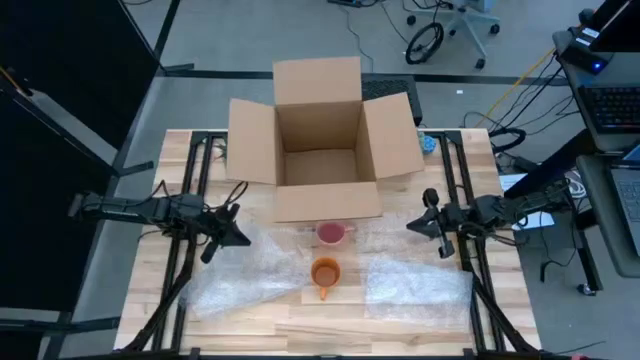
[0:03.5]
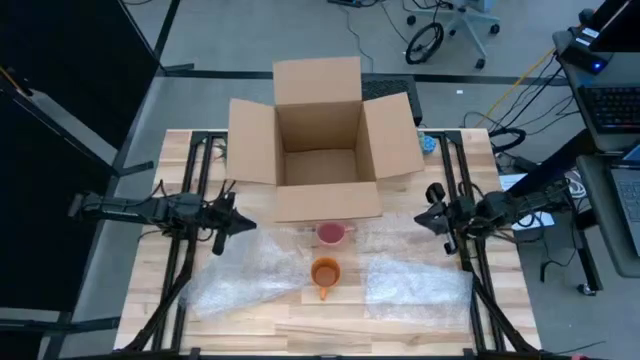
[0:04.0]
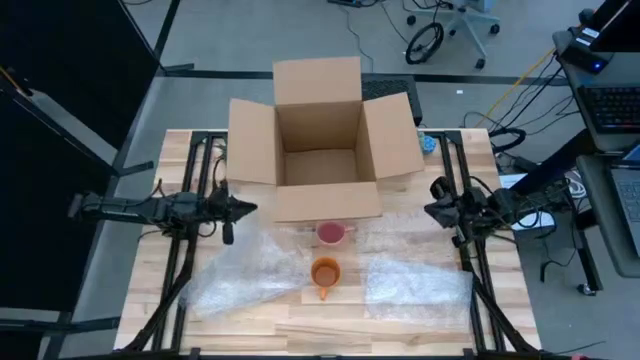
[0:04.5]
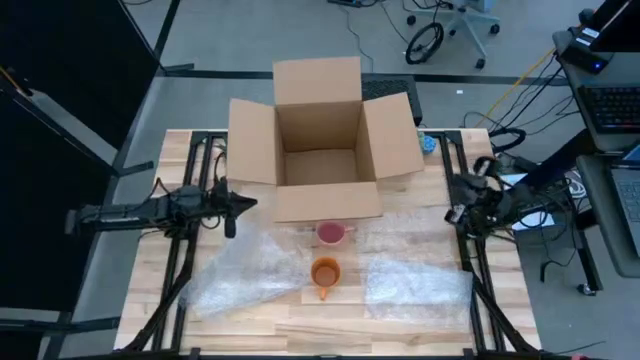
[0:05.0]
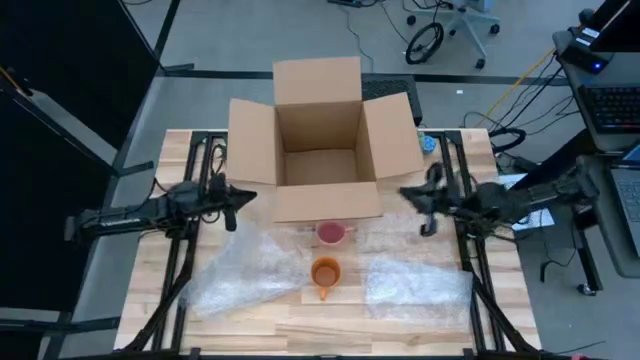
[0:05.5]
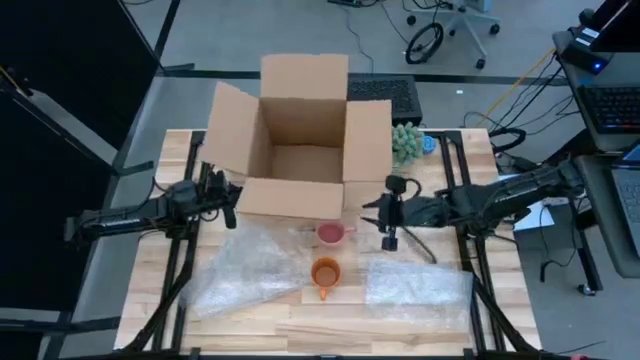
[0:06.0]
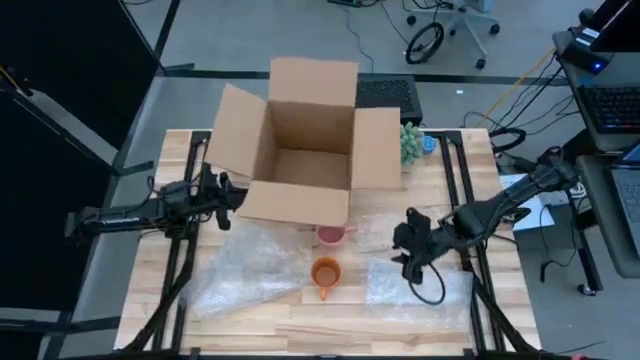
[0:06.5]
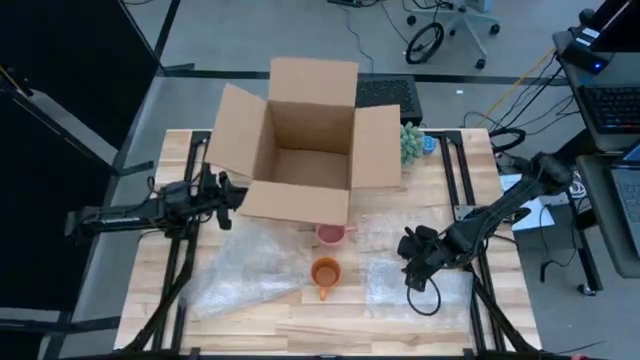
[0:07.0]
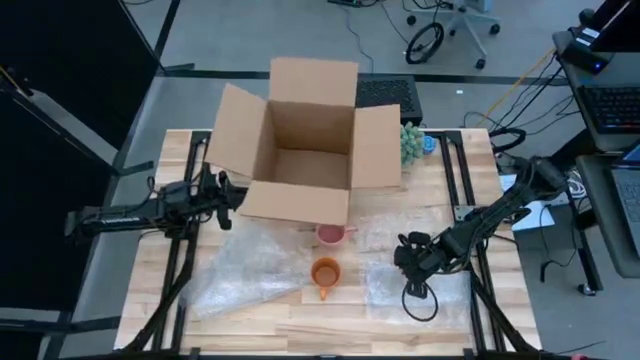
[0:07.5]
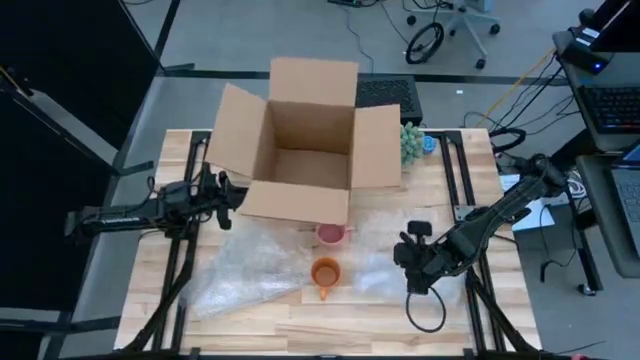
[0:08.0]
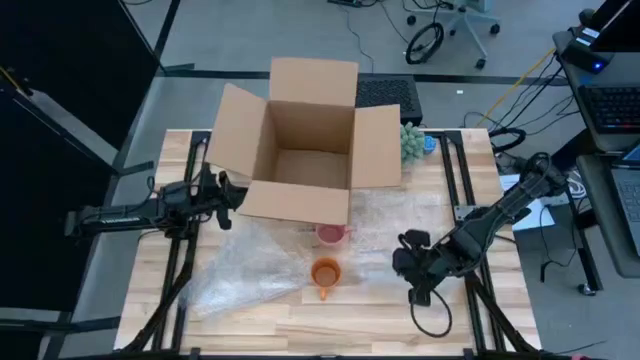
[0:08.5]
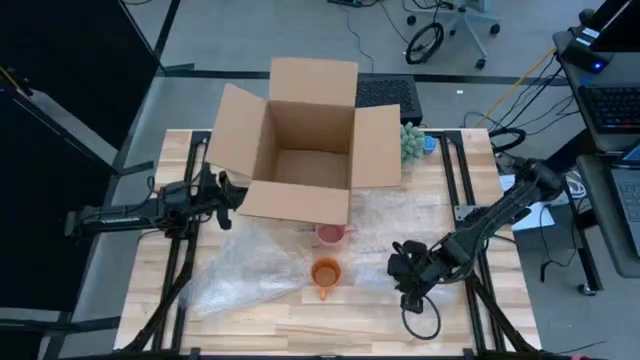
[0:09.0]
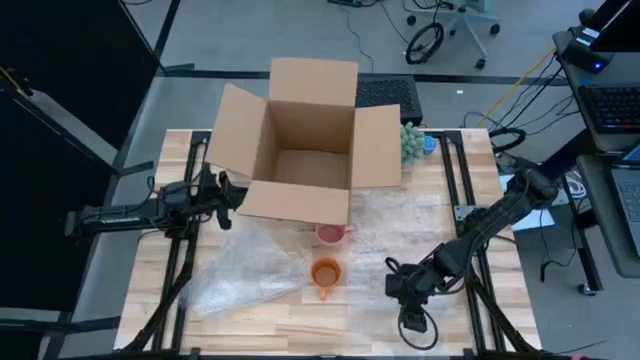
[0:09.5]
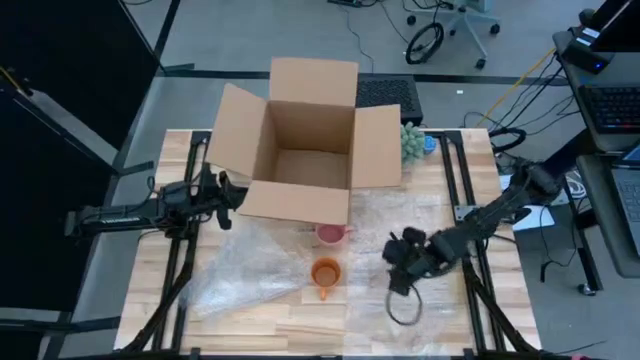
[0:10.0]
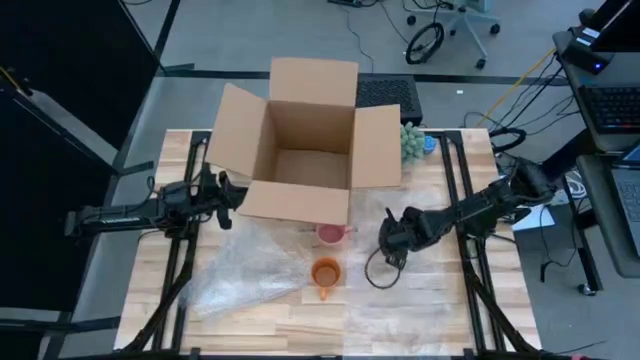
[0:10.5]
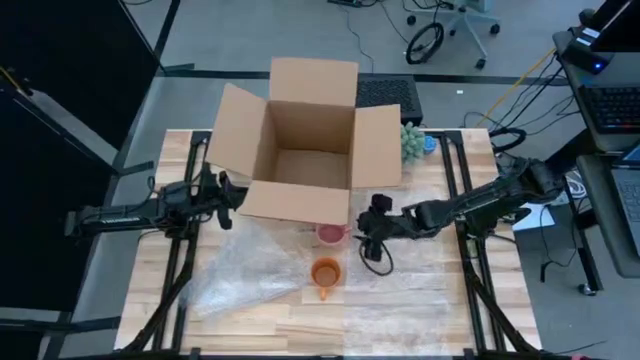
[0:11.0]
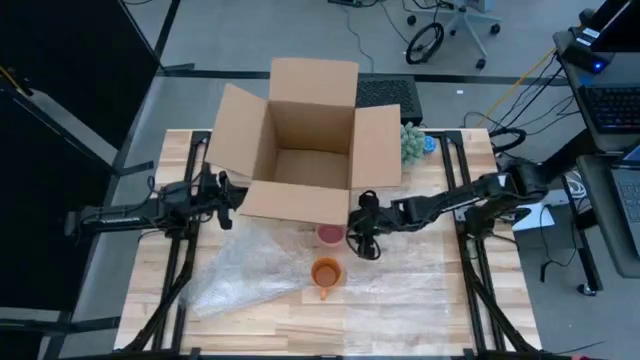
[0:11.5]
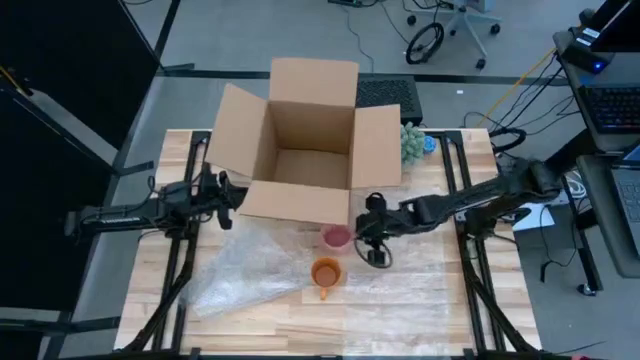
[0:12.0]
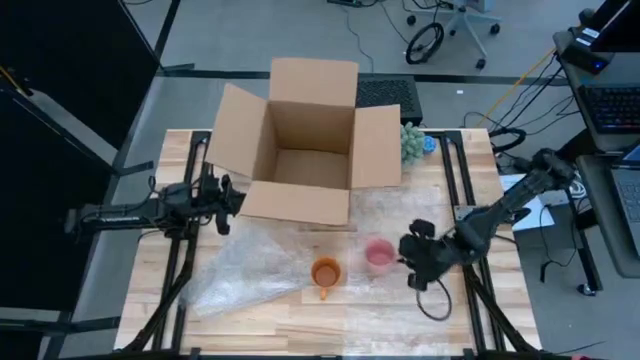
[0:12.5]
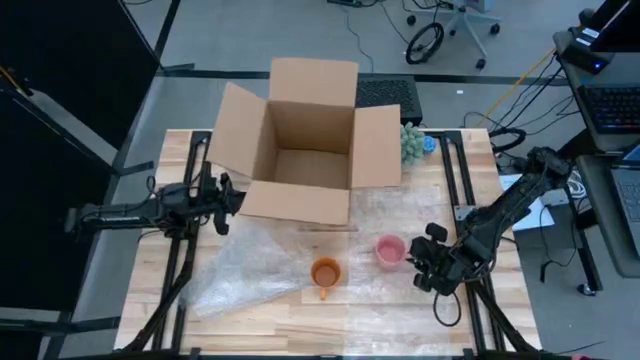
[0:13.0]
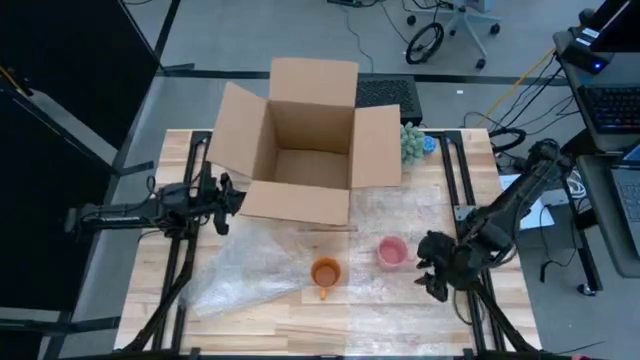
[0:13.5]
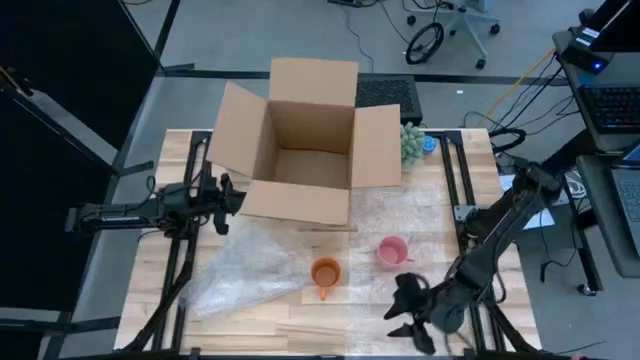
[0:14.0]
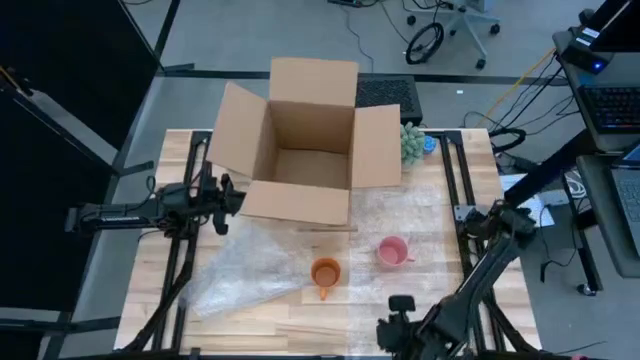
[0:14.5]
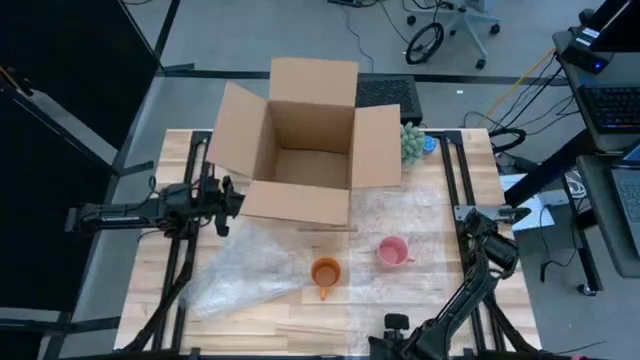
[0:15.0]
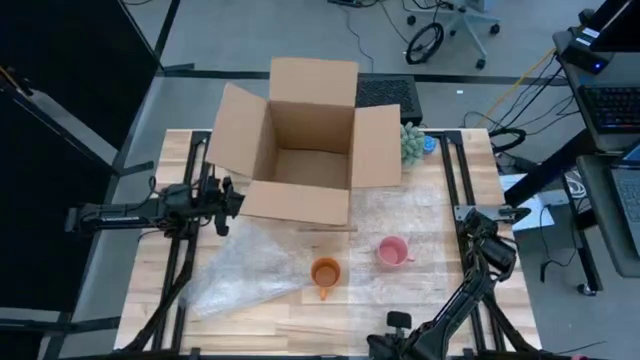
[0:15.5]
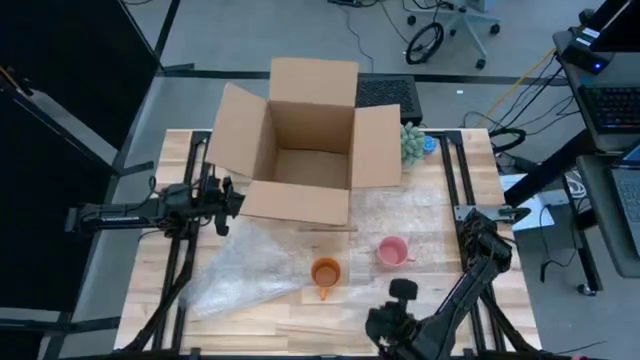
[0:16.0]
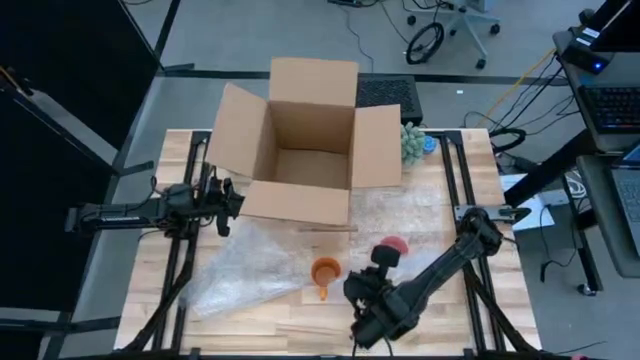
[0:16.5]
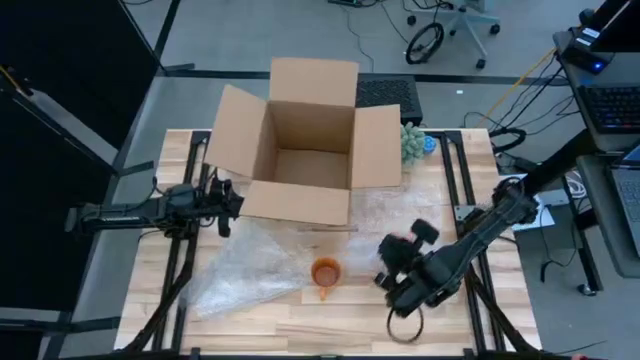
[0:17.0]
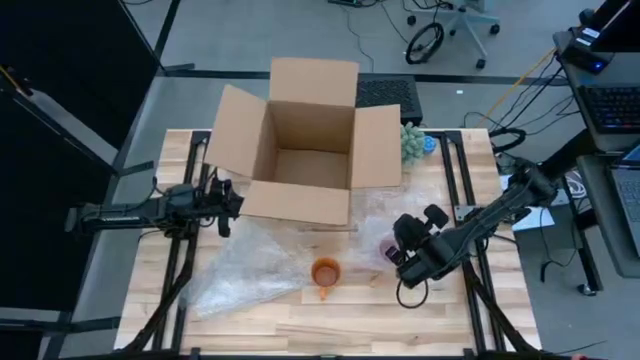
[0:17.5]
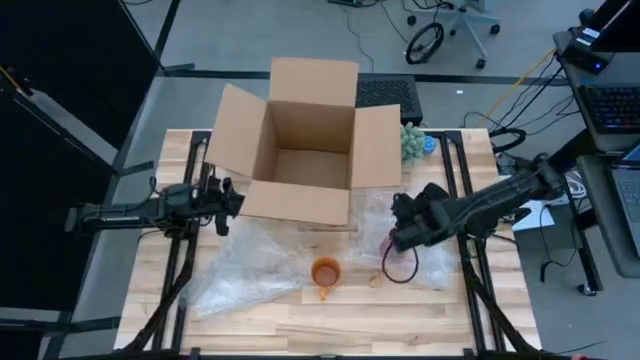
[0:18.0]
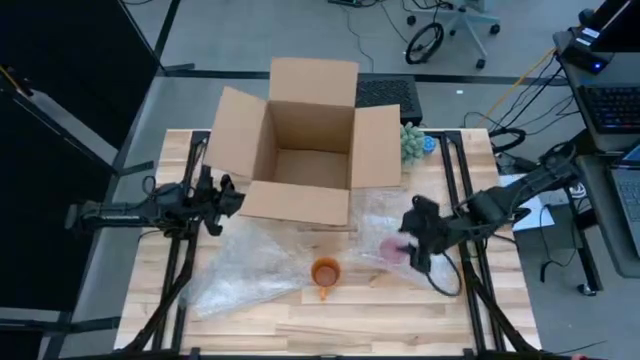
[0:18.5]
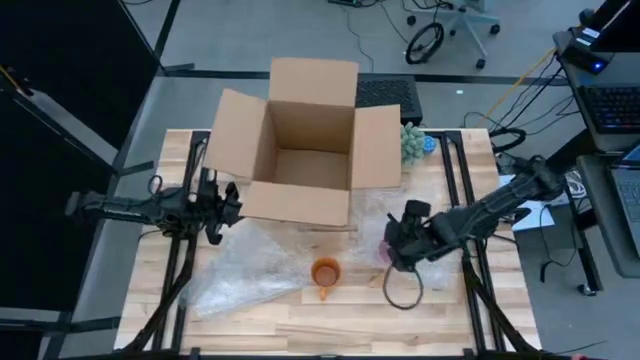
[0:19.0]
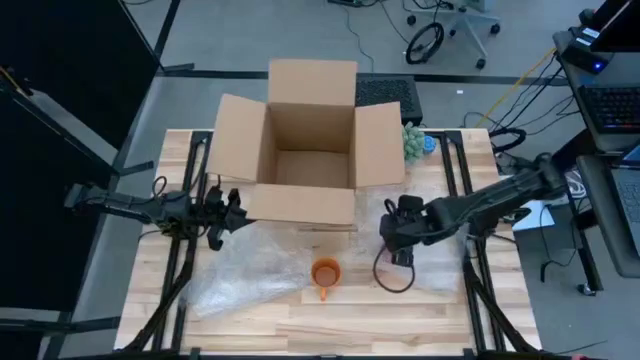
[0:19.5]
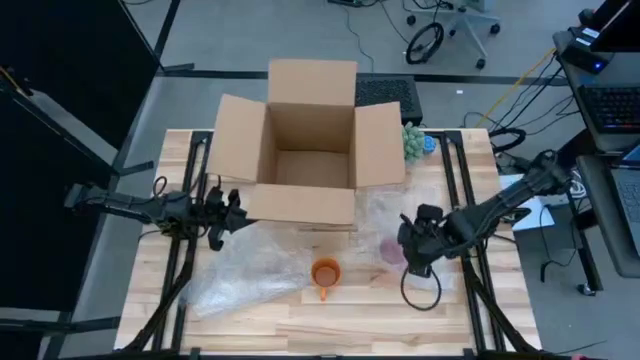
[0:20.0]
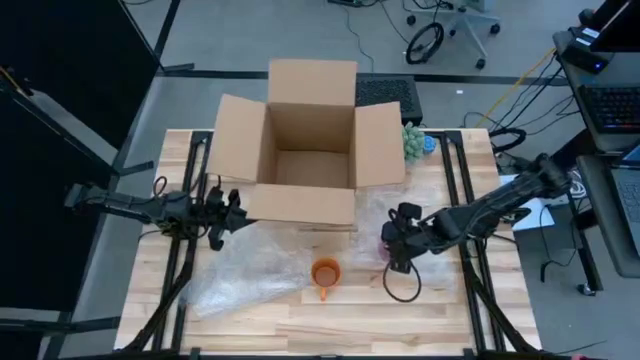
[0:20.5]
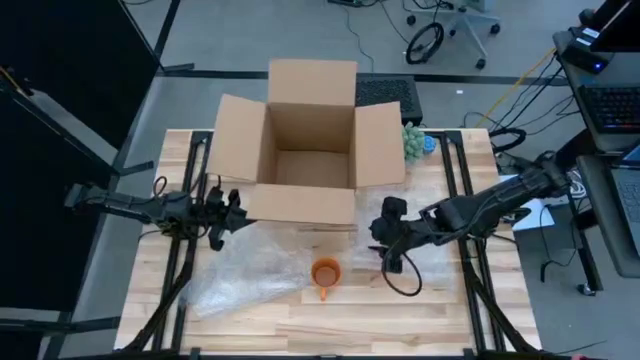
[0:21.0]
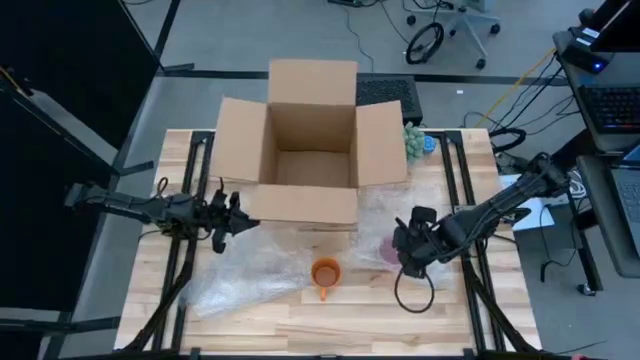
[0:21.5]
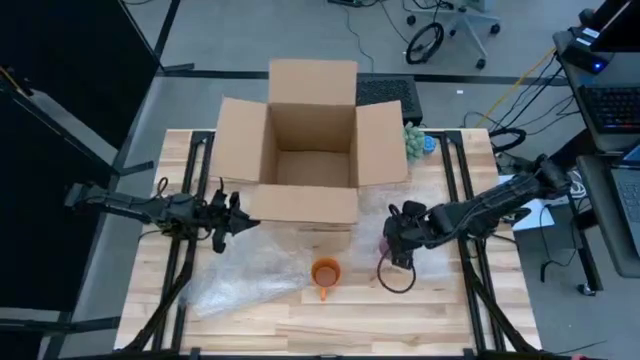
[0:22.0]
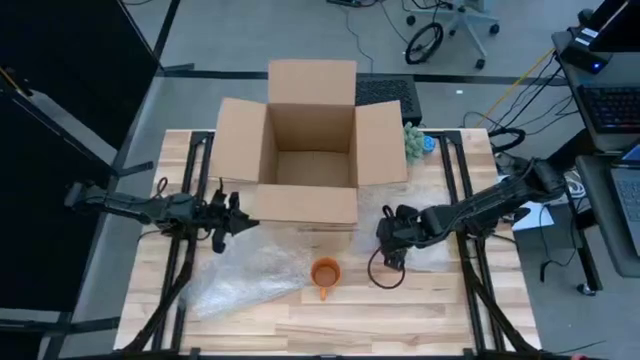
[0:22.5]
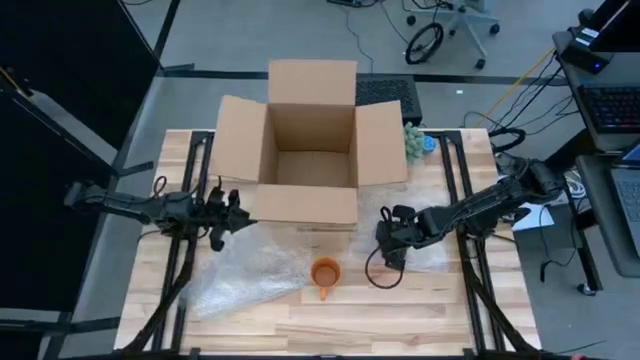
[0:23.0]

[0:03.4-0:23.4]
Task: wrap mug
Wrap the pink mug with the transparent bubble wrap
